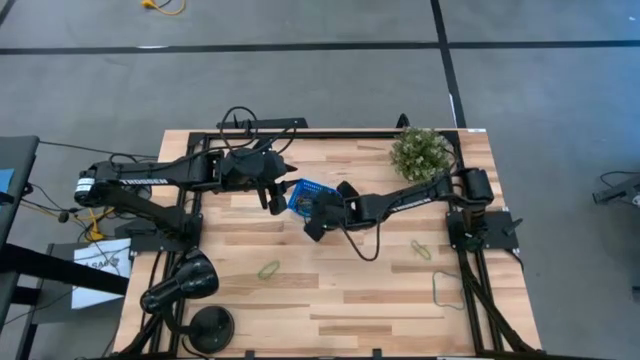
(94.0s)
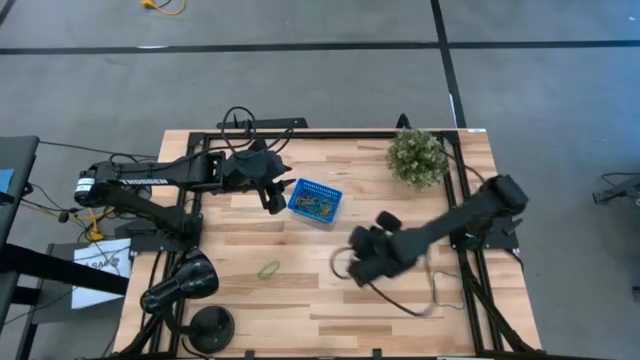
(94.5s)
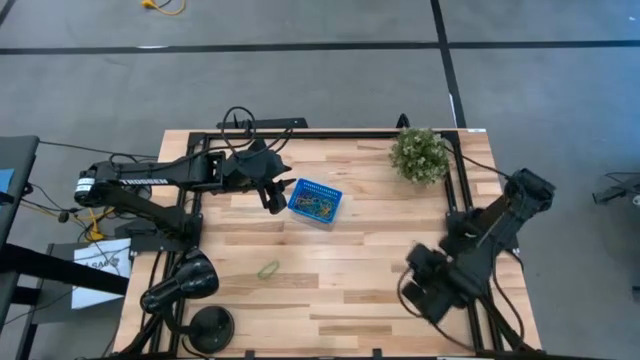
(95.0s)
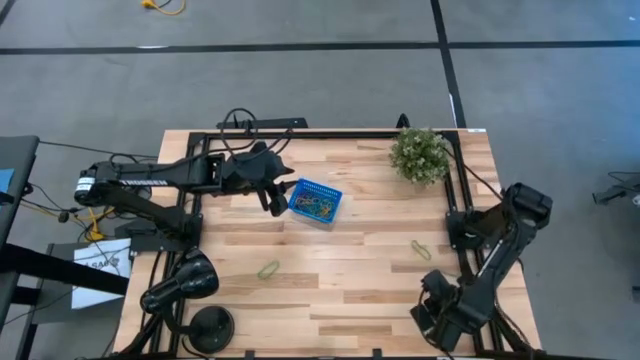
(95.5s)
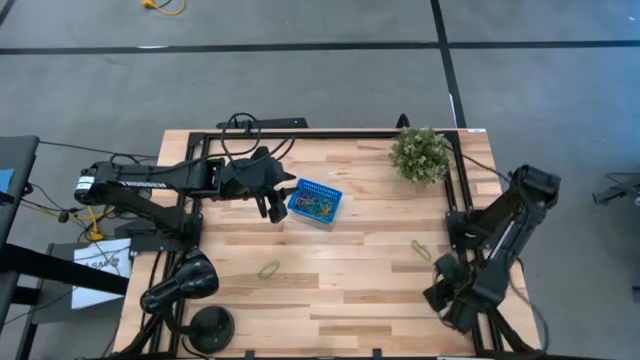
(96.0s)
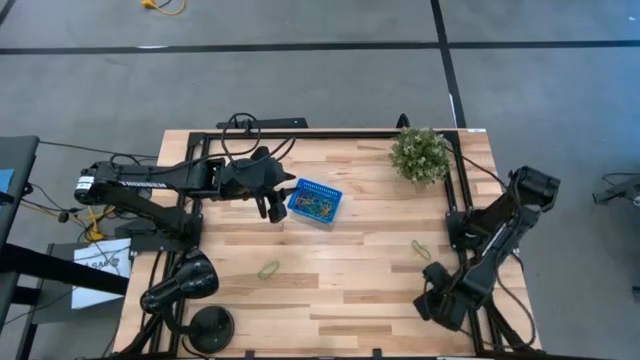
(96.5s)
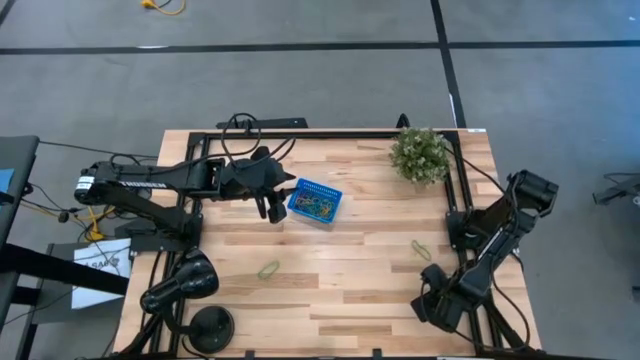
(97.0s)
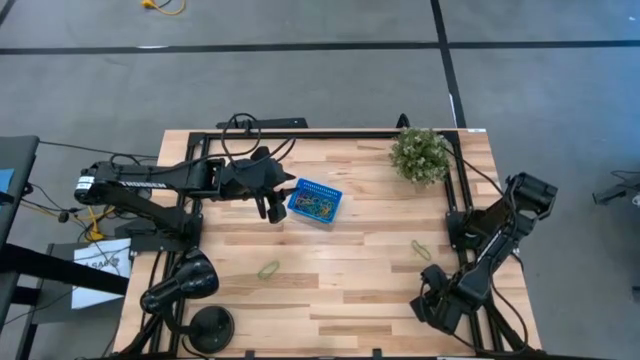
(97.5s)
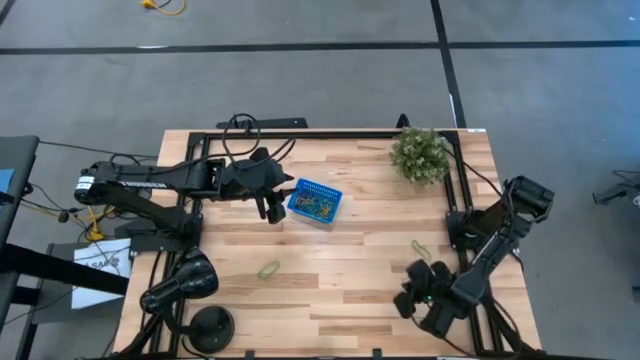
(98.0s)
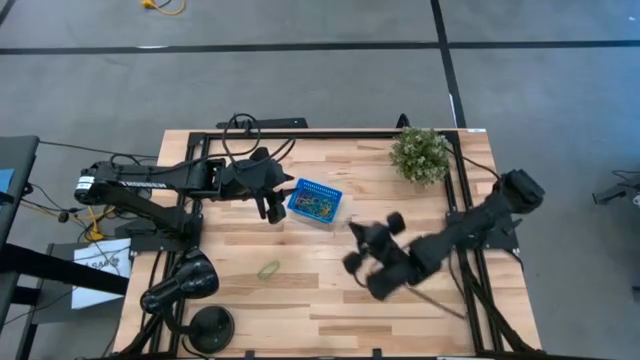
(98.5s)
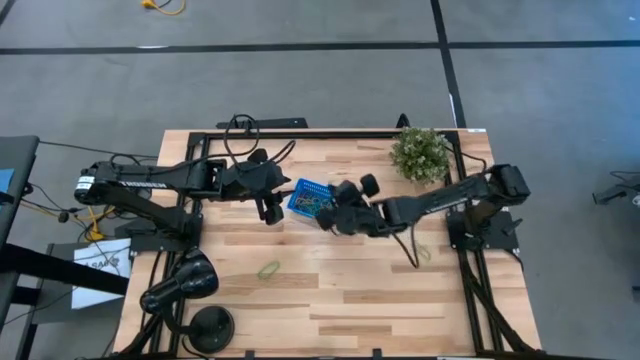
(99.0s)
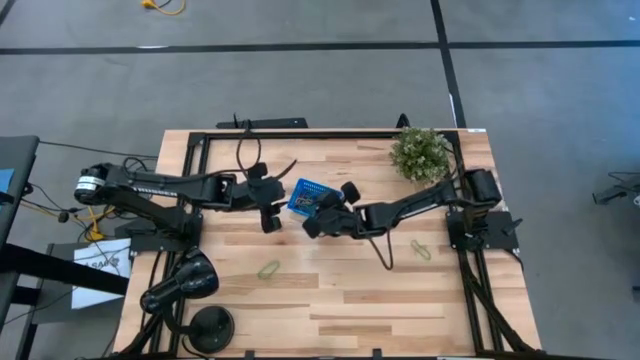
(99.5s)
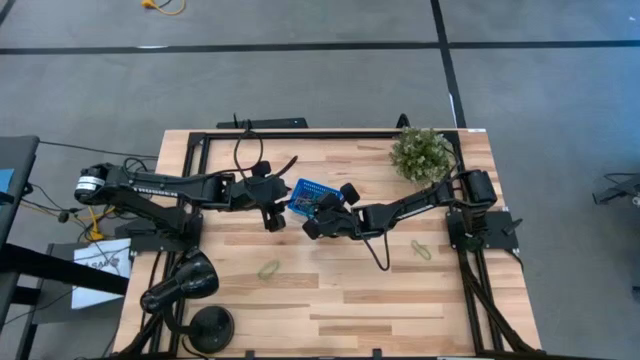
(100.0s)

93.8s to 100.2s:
Task: Pick and place items into bin
Put the blue rubber band into the blue bin

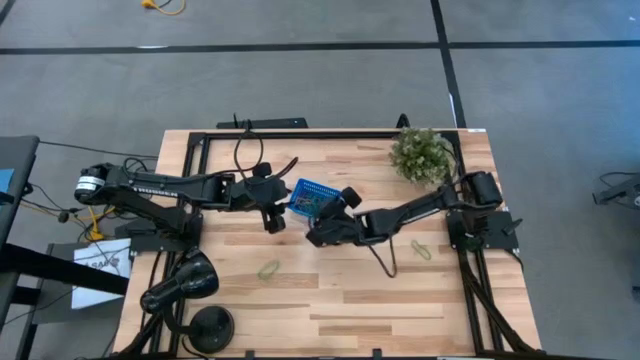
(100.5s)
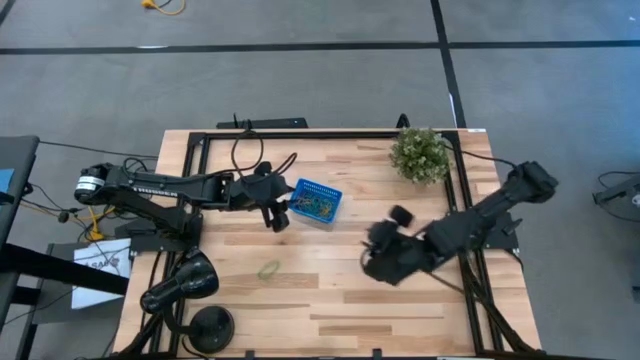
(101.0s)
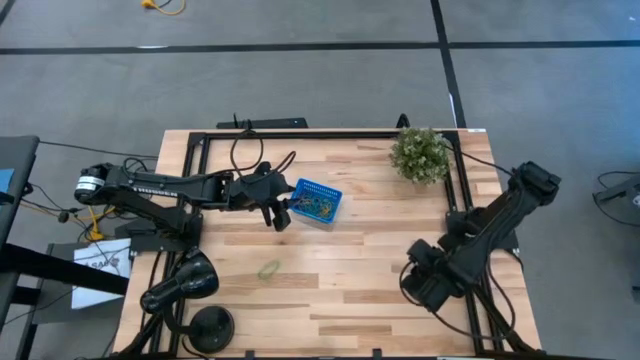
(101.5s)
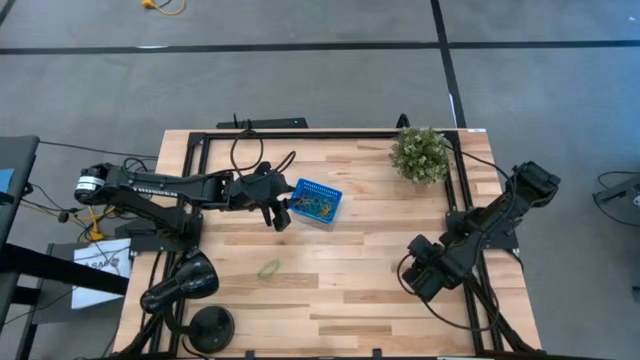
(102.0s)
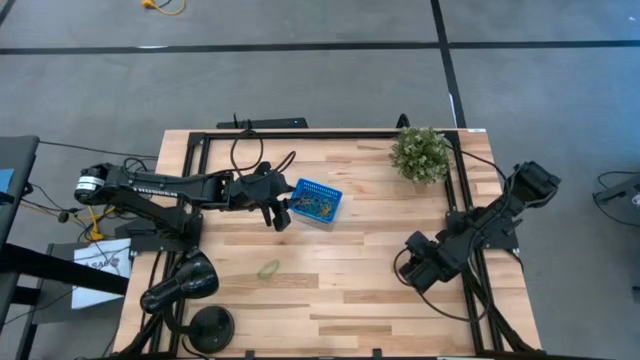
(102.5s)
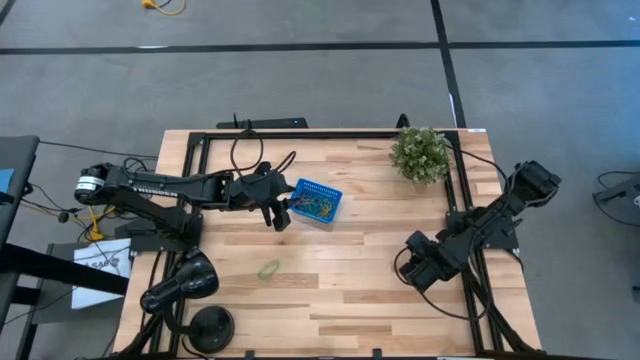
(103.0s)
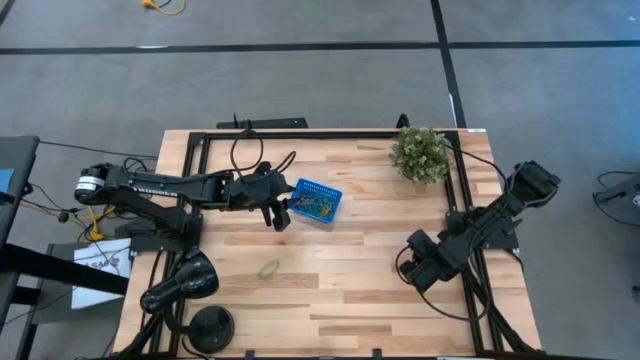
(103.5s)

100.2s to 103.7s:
Put the green rubber band into the blue bin

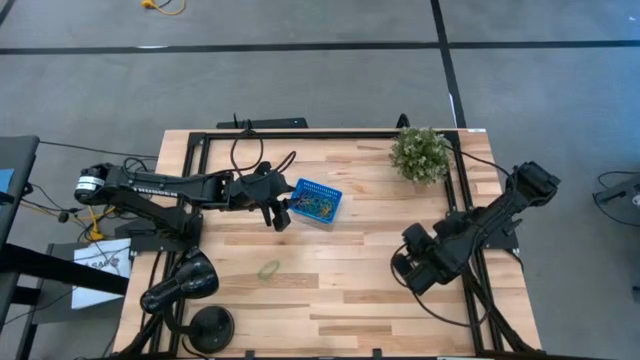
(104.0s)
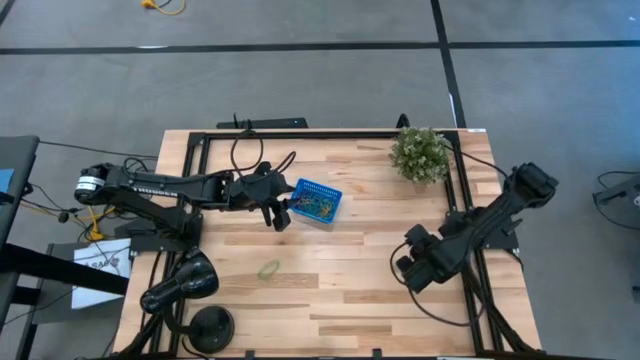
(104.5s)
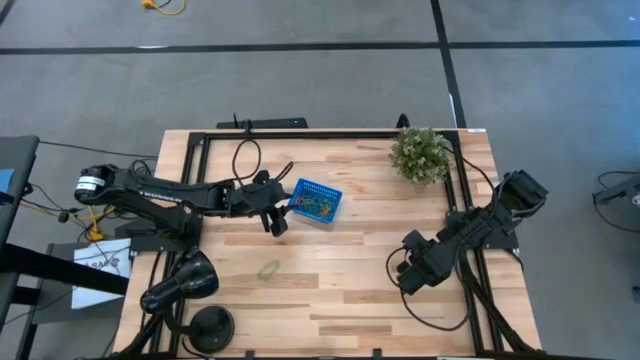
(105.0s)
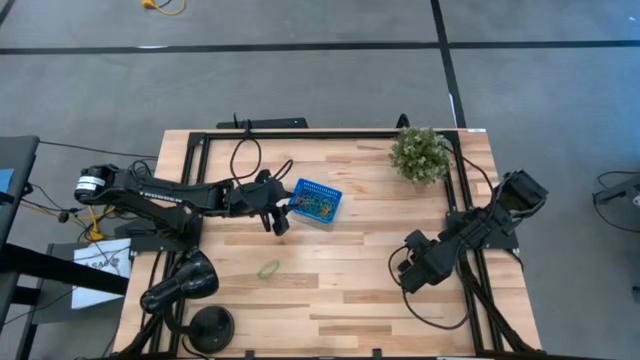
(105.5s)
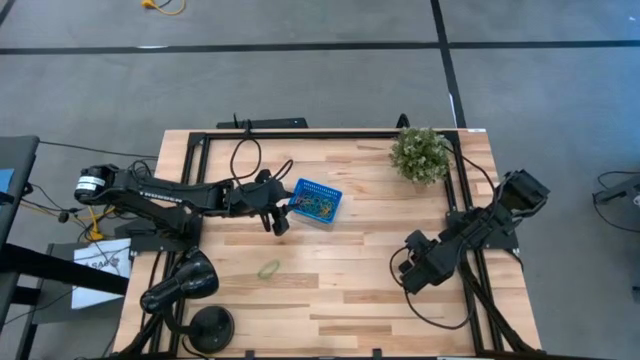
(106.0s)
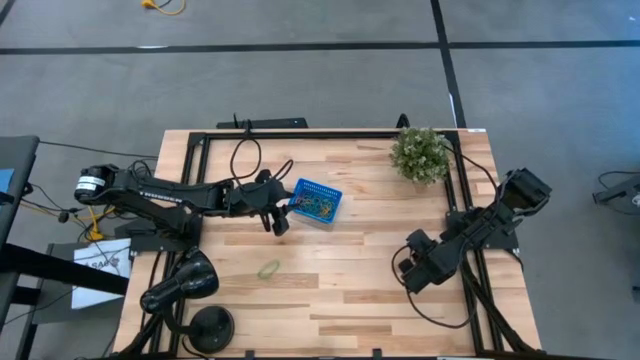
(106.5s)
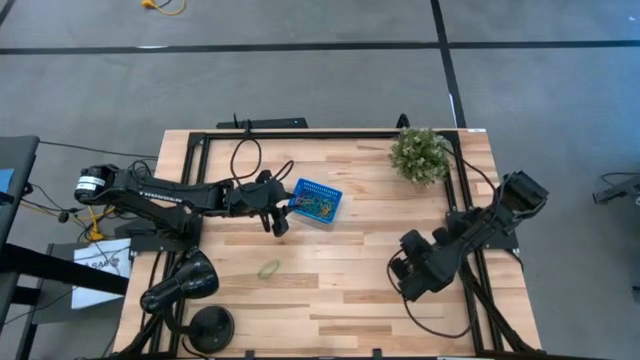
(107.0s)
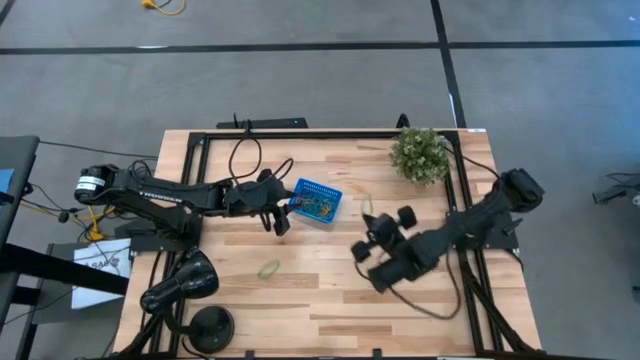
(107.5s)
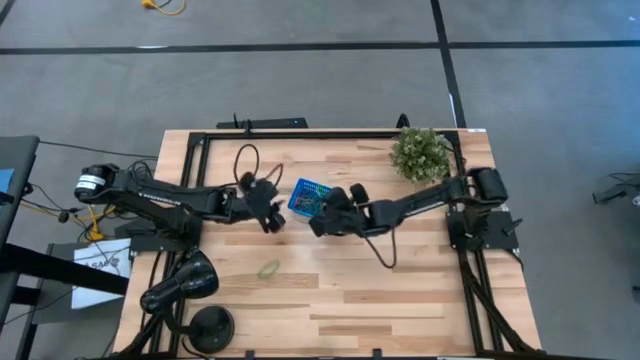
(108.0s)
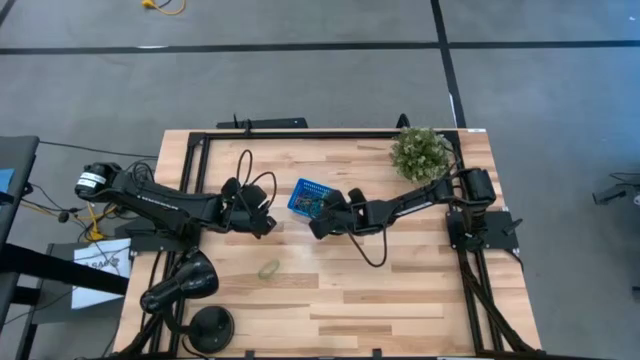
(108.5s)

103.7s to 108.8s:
Put the green rubber band into the blue bin

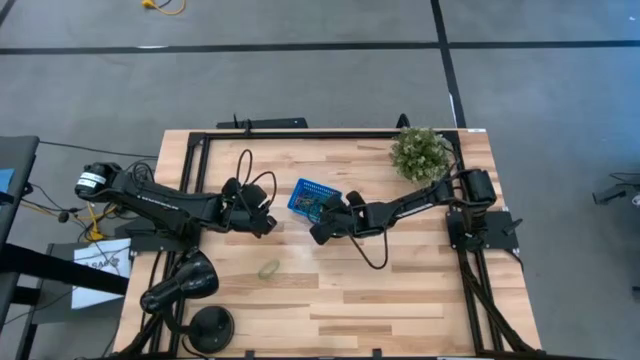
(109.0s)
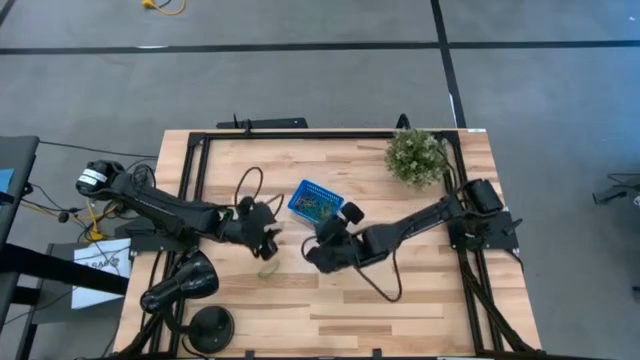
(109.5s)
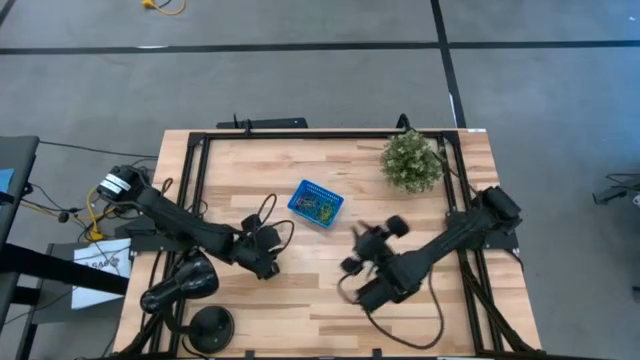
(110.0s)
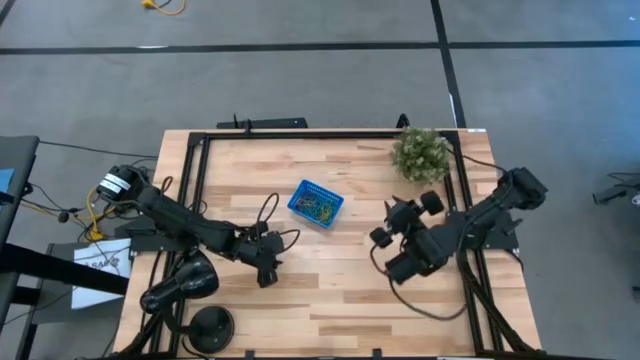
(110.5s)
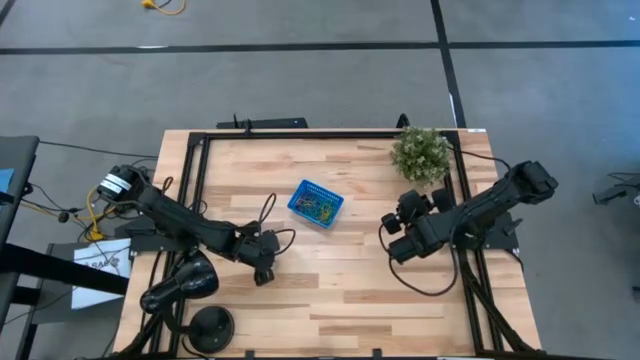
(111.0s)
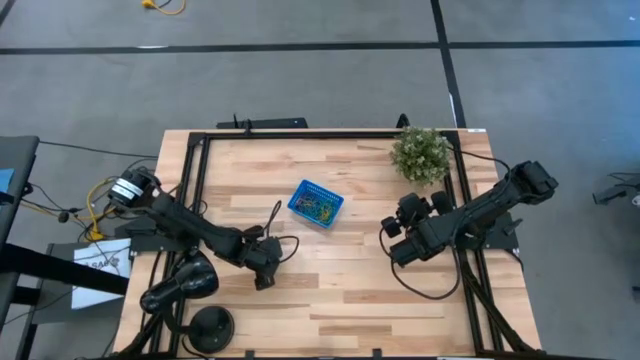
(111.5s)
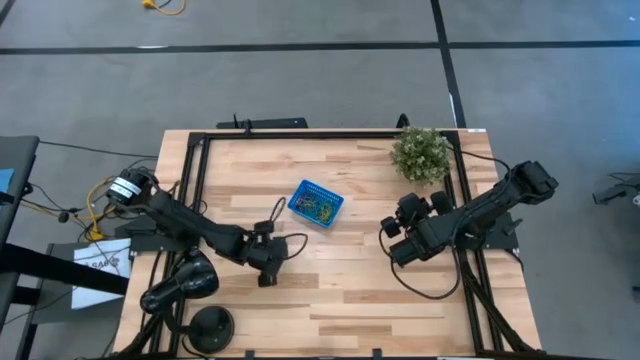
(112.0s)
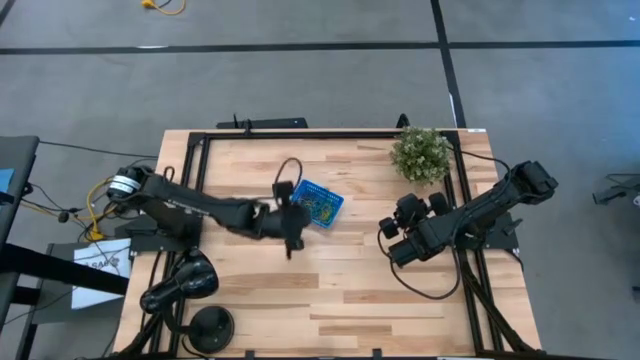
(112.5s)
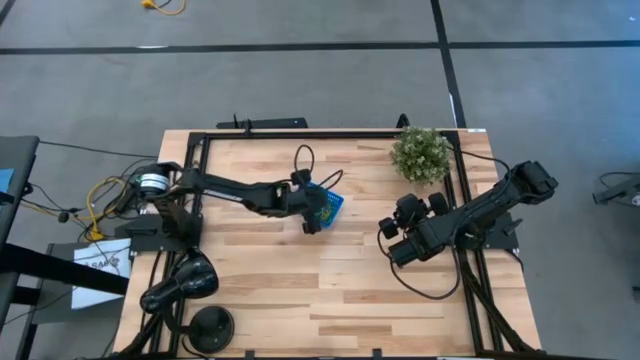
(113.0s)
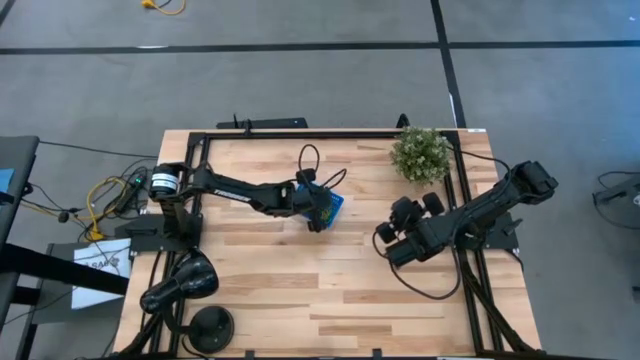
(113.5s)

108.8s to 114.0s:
Put the green rubber band into the blue bin

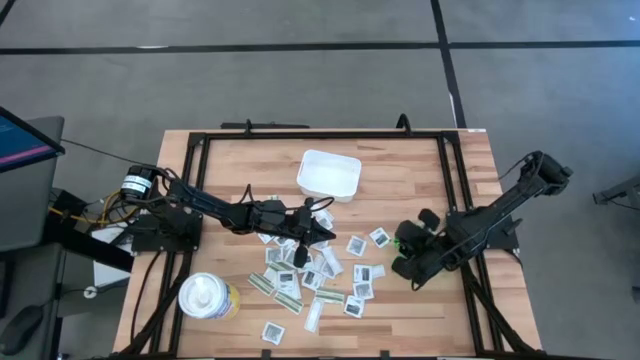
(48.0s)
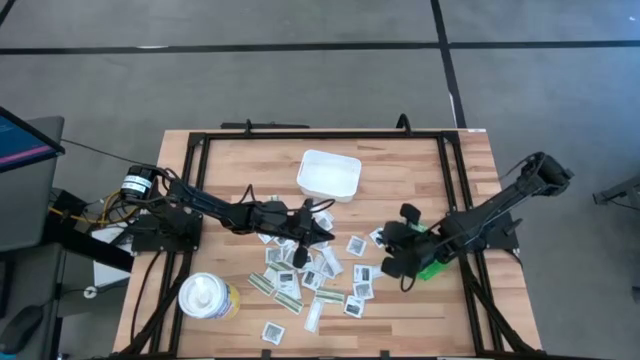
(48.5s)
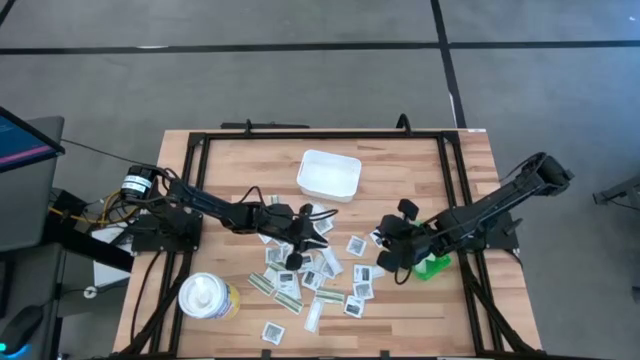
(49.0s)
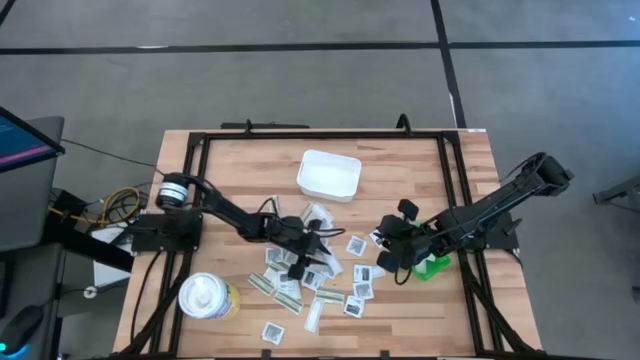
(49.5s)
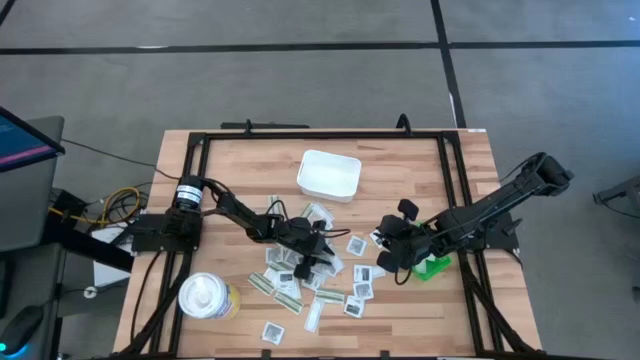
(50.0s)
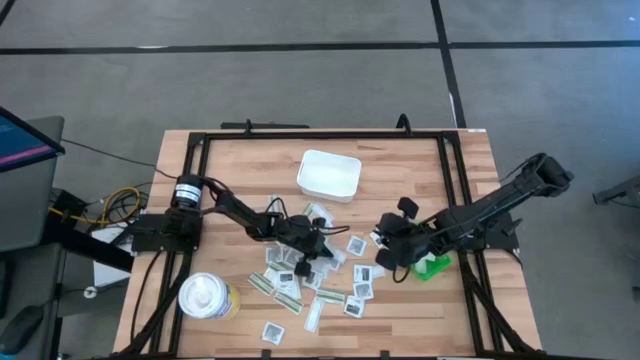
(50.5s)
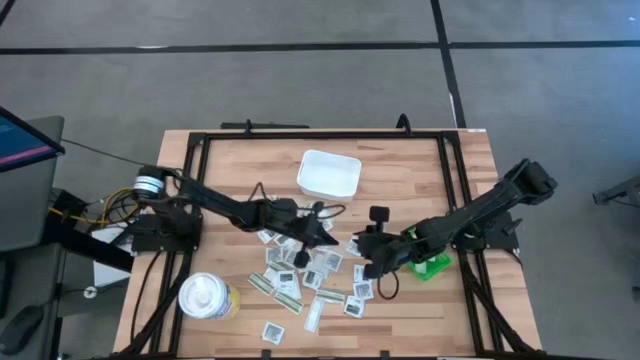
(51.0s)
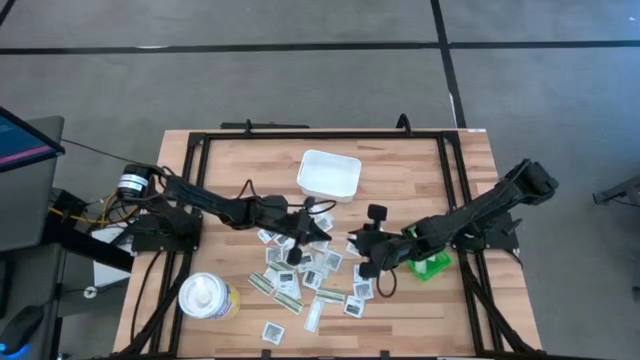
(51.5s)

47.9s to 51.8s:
Task: Pick & Place First Aid Supplies
Put the bandage pack into the green bin
